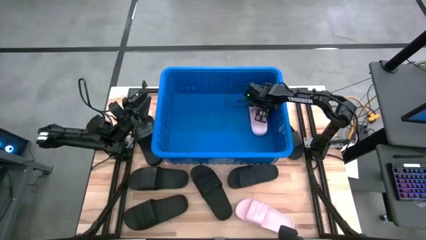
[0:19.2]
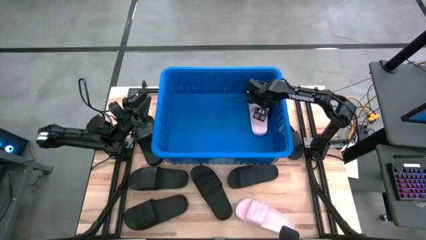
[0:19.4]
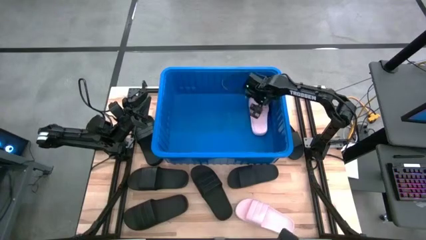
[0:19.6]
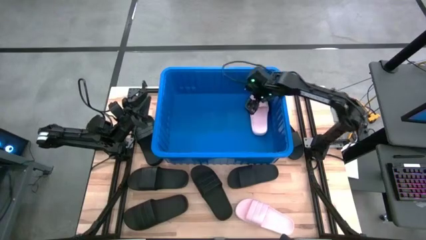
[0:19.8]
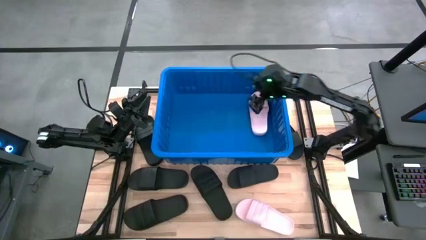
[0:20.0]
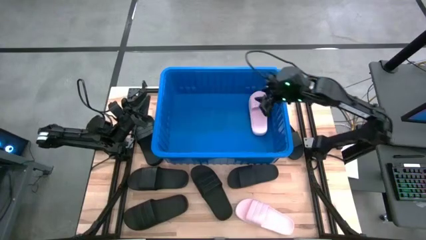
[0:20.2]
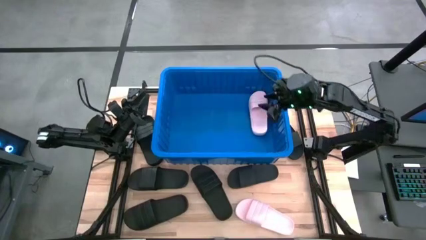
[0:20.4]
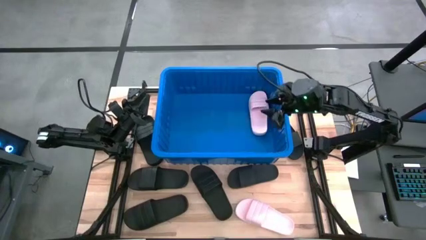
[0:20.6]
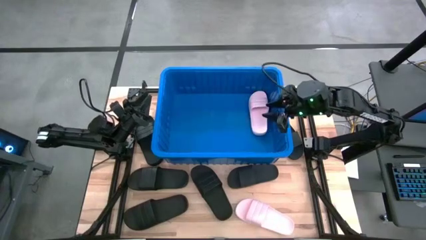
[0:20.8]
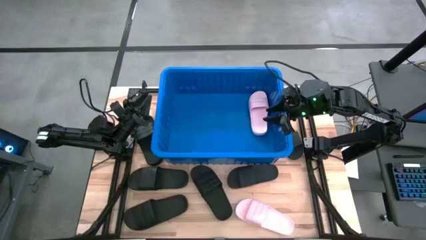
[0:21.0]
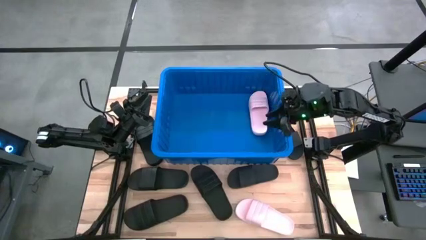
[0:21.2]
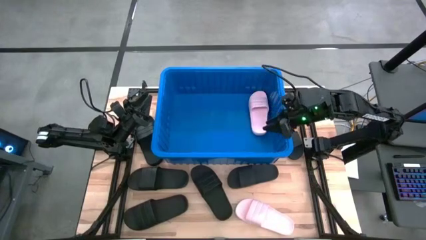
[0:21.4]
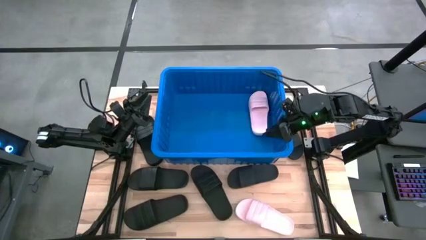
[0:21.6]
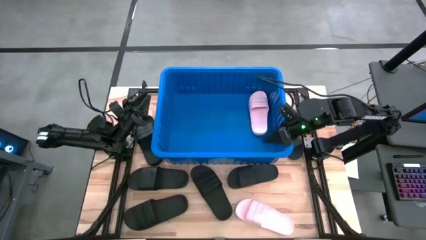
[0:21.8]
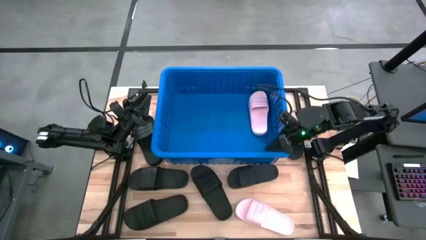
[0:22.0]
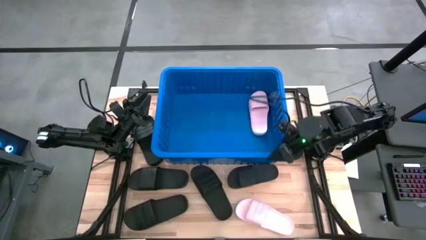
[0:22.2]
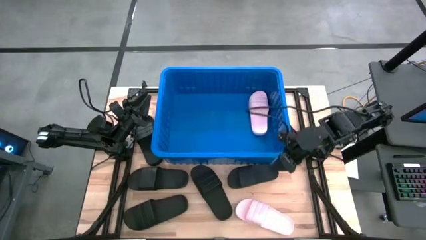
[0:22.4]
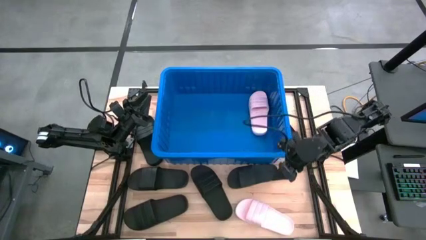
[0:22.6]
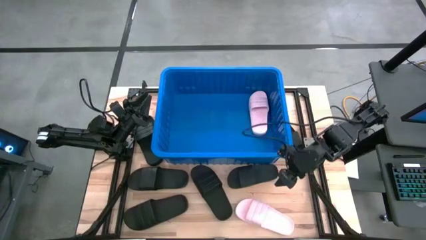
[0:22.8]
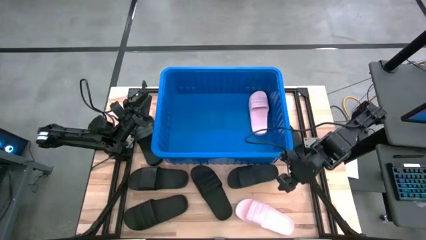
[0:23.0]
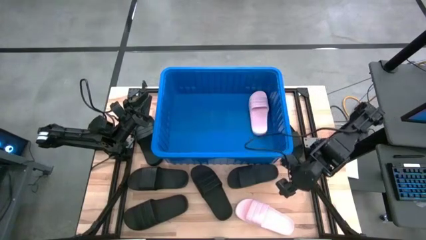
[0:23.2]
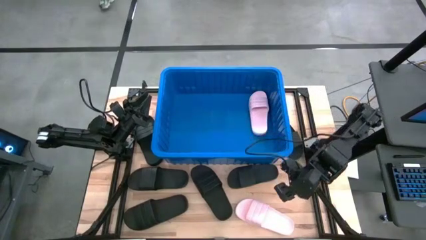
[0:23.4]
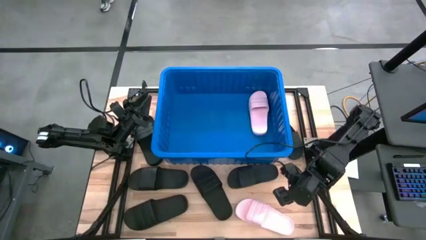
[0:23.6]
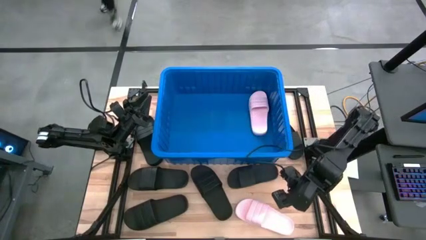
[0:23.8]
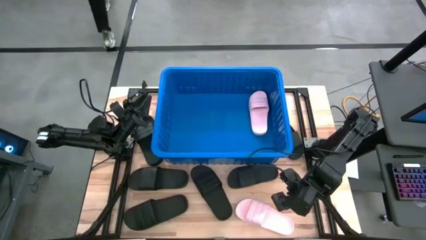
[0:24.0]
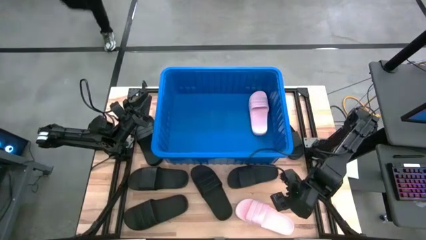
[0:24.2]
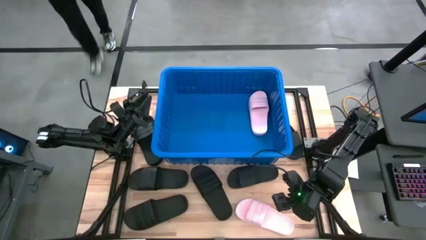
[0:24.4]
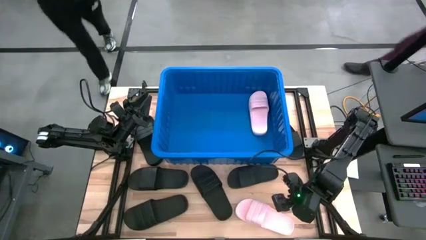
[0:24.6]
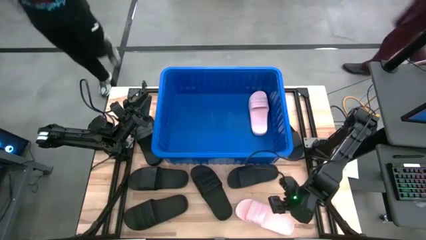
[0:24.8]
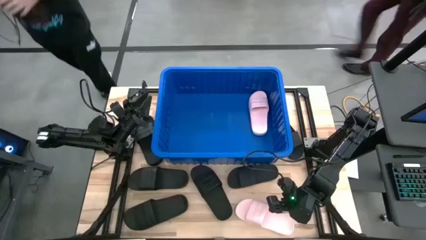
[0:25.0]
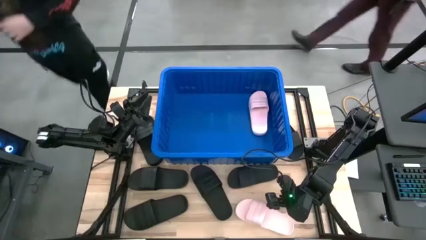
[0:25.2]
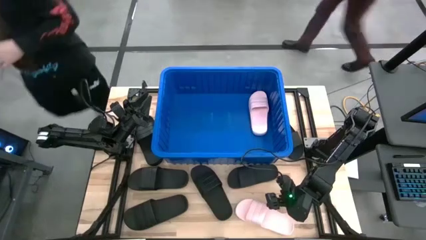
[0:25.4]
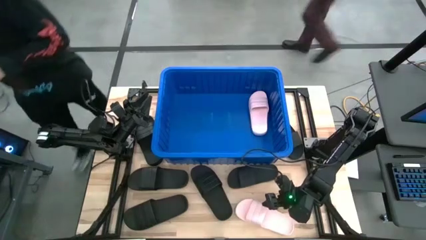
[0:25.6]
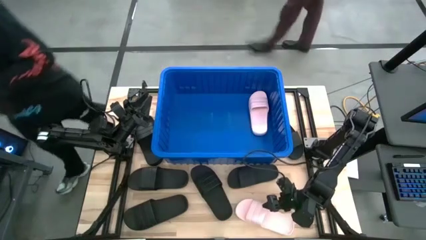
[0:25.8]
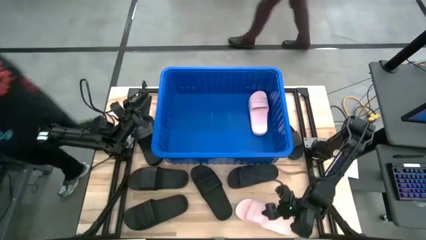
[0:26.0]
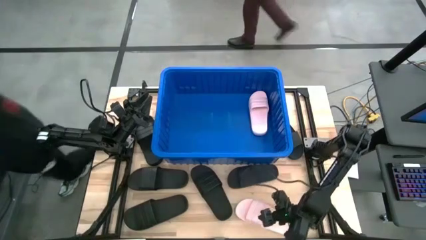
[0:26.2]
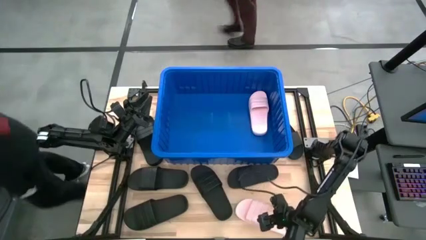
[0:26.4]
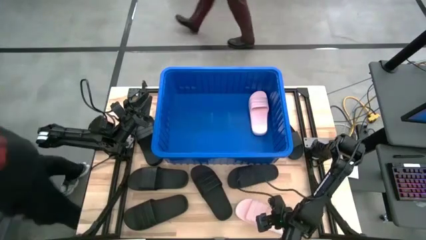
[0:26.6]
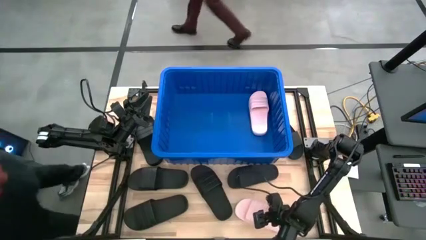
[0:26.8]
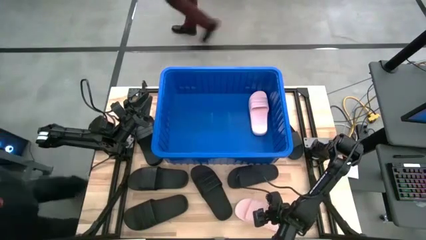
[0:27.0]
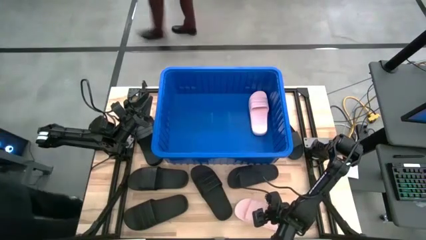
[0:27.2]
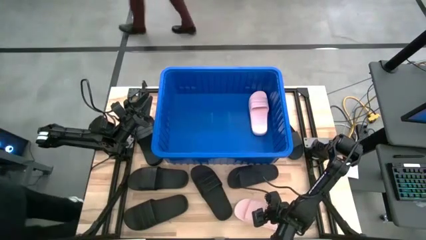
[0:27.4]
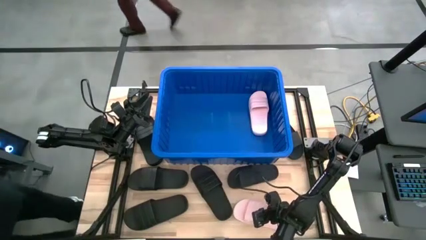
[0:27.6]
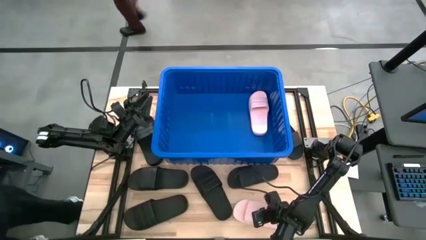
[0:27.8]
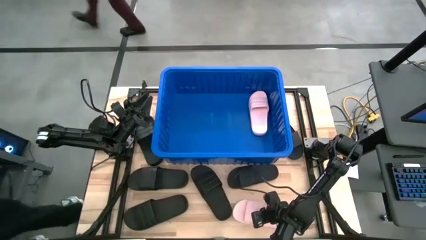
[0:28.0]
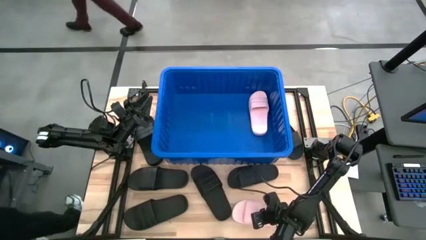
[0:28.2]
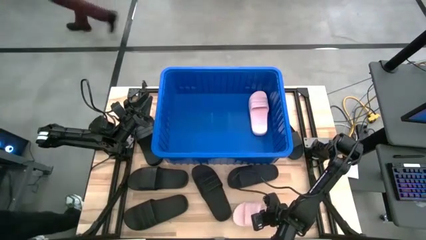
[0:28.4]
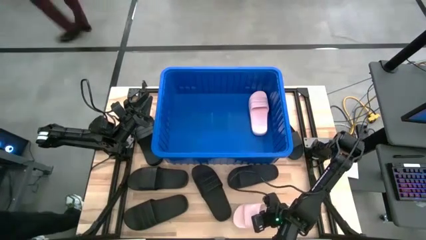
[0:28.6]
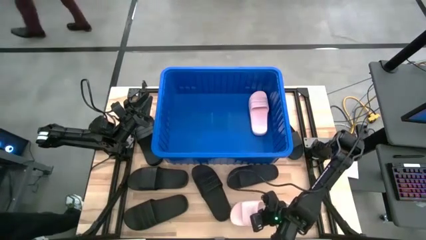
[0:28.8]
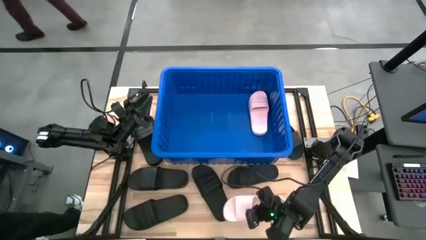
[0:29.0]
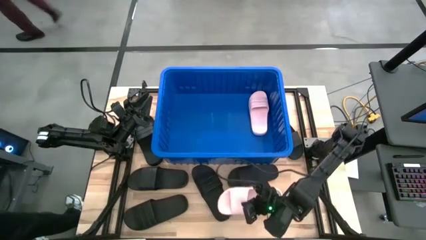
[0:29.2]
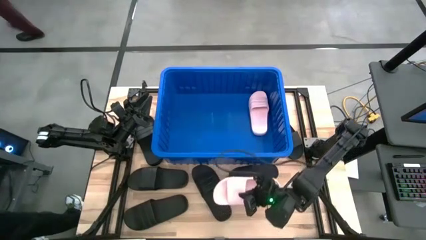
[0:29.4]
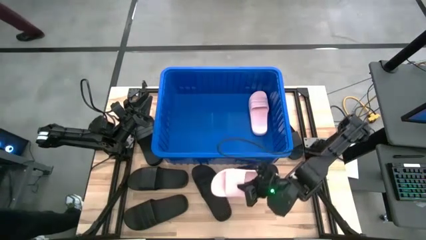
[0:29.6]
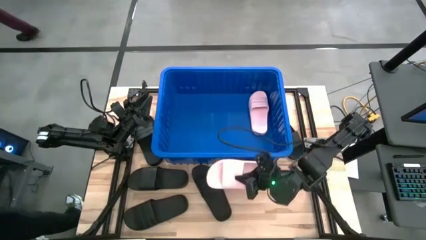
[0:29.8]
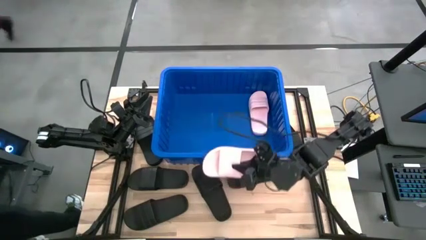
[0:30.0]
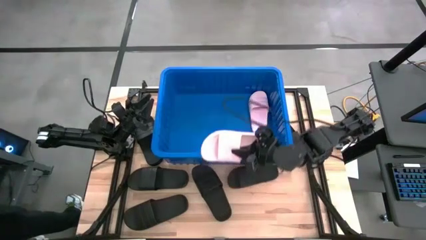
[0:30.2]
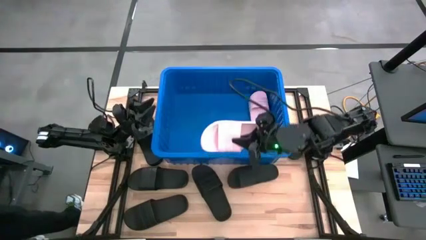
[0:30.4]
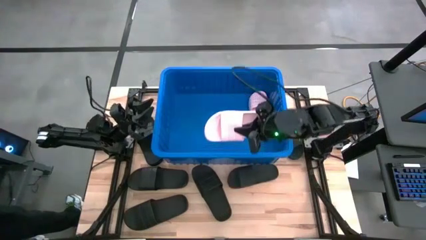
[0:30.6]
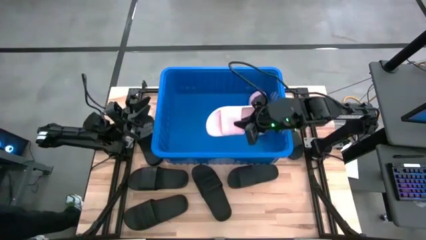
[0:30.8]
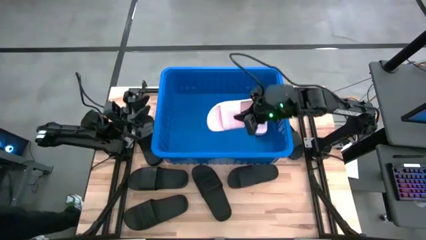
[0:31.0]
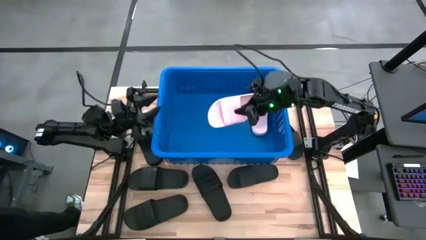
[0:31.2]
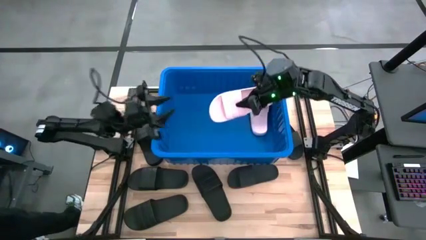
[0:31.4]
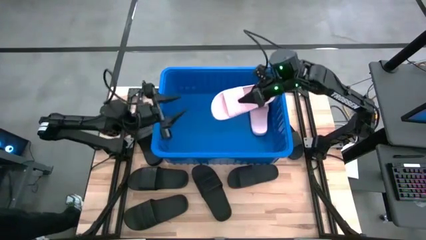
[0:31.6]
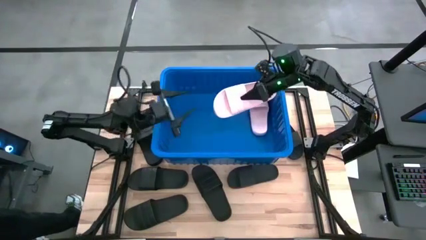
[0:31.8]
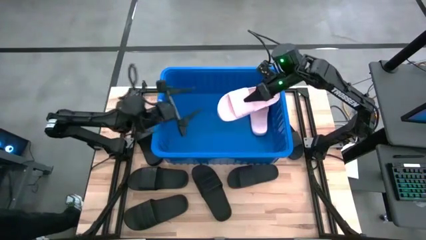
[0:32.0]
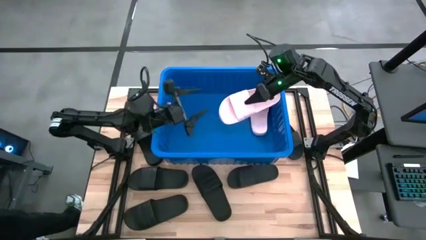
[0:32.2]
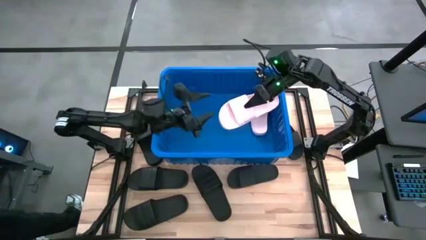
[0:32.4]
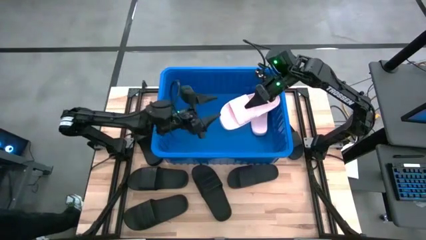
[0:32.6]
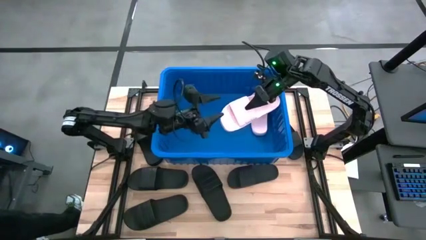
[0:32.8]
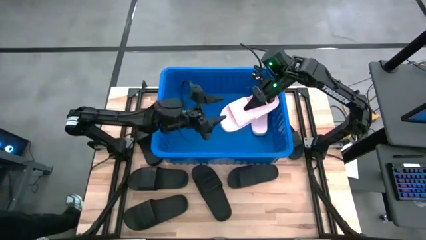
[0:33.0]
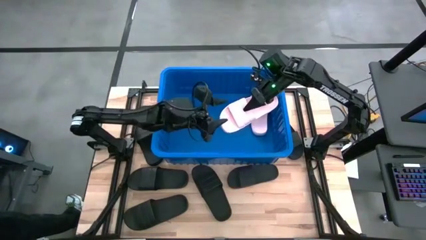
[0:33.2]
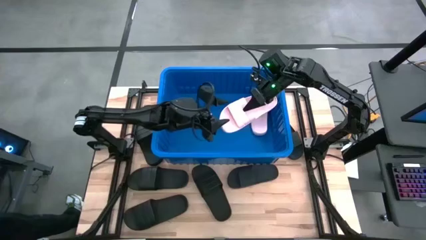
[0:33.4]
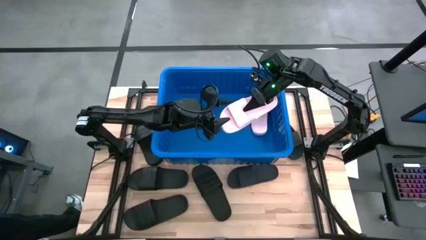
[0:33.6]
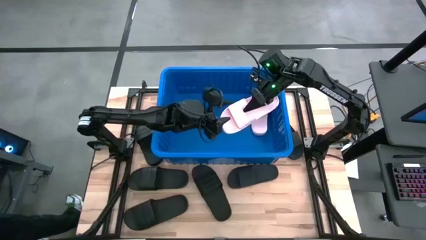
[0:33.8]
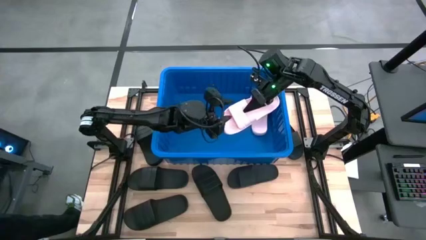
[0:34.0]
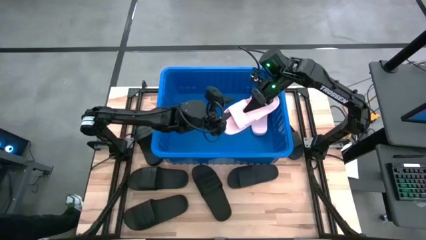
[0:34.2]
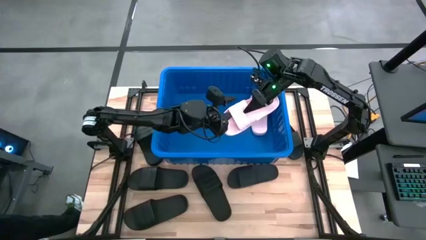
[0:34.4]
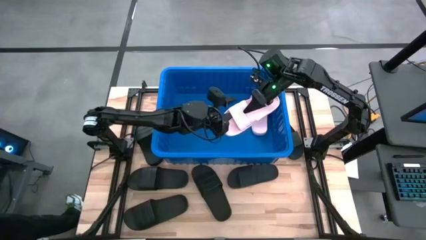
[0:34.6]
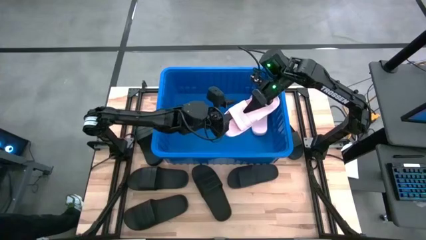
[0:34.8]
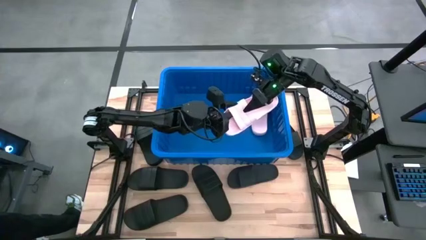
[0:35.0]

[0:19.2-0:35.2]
Task: Pick and place slides into bin
Stack the pink slide on top of the pink slide into the blue bin
